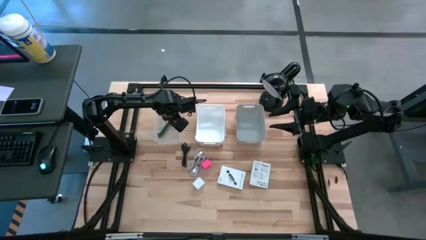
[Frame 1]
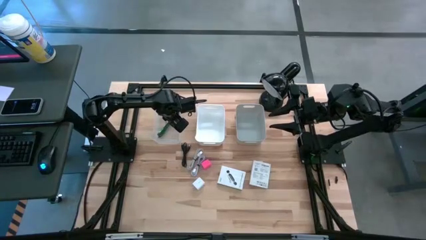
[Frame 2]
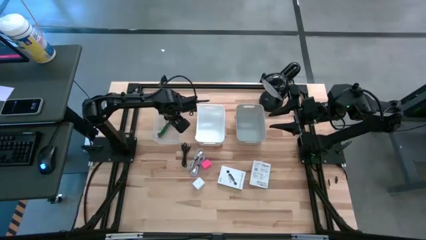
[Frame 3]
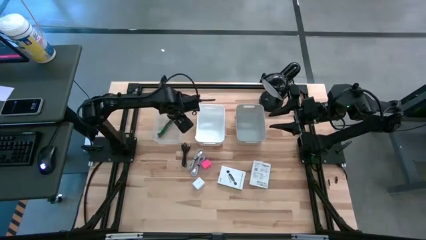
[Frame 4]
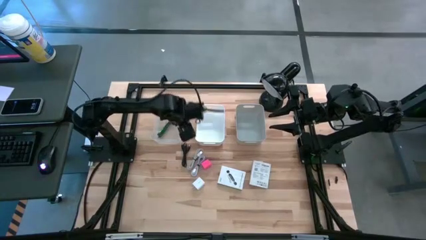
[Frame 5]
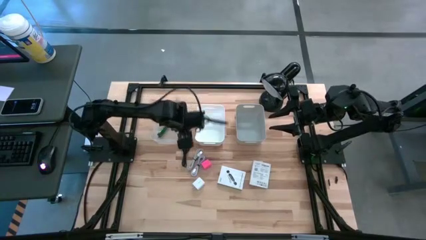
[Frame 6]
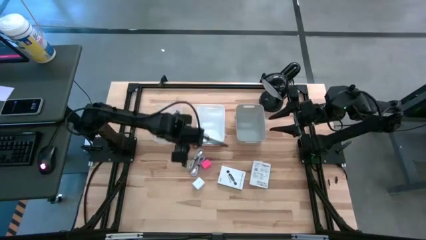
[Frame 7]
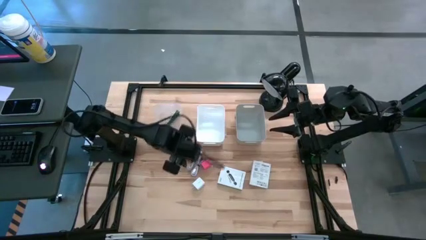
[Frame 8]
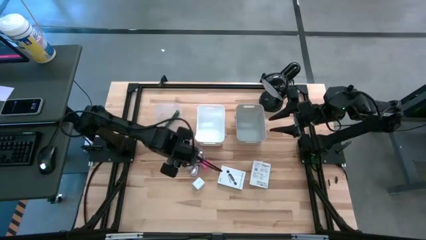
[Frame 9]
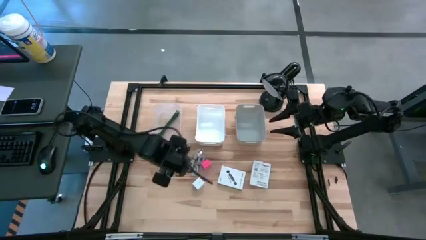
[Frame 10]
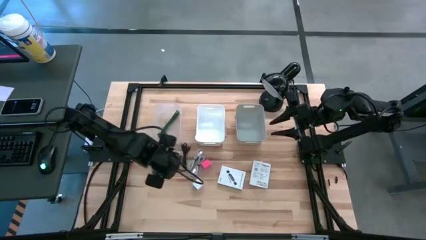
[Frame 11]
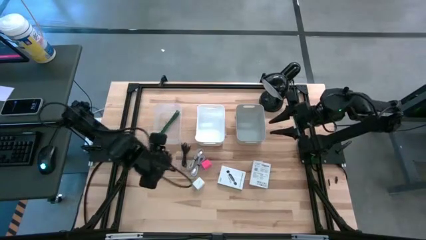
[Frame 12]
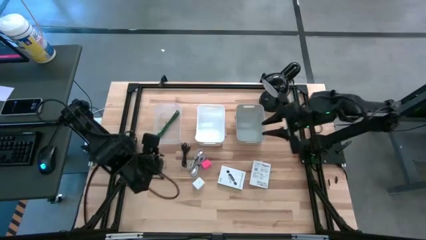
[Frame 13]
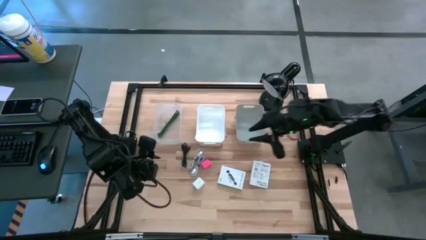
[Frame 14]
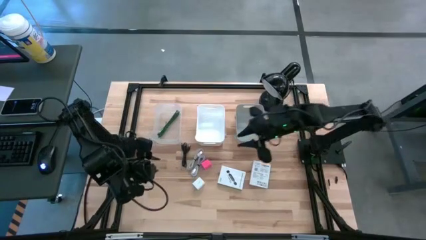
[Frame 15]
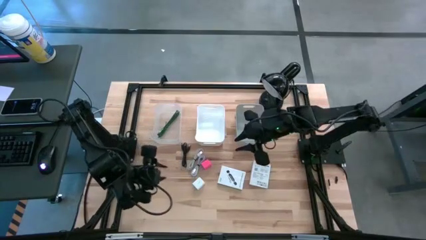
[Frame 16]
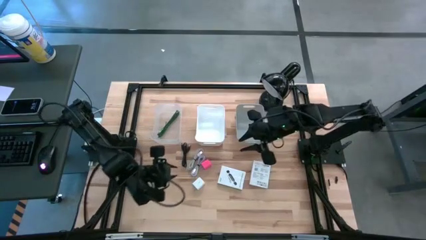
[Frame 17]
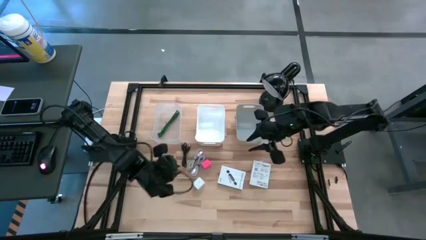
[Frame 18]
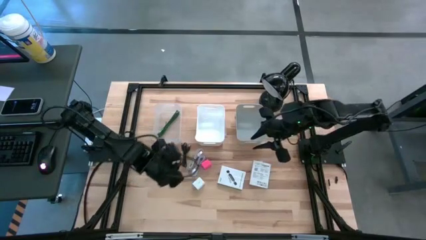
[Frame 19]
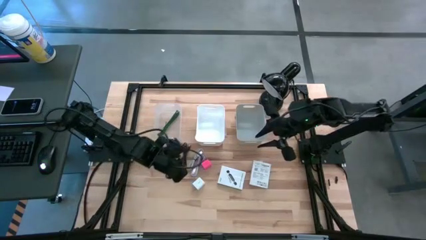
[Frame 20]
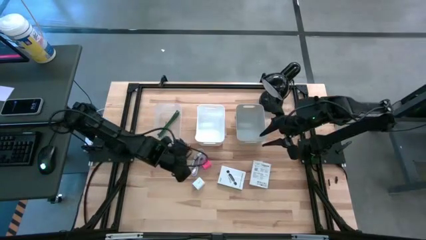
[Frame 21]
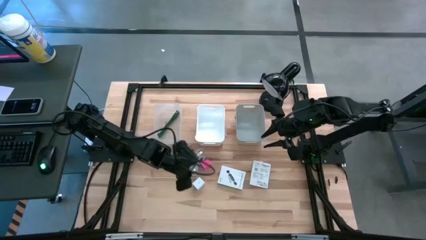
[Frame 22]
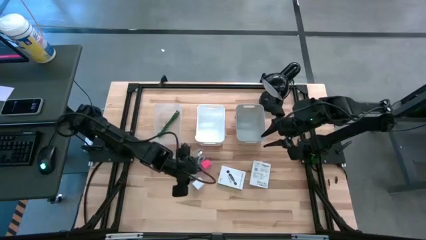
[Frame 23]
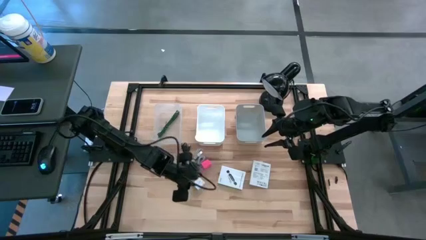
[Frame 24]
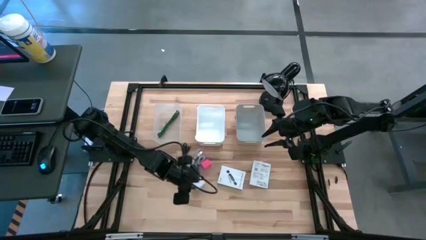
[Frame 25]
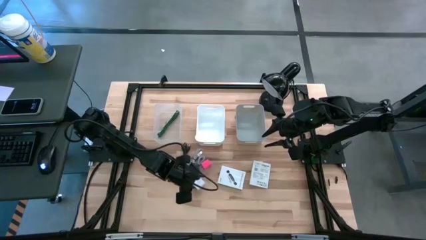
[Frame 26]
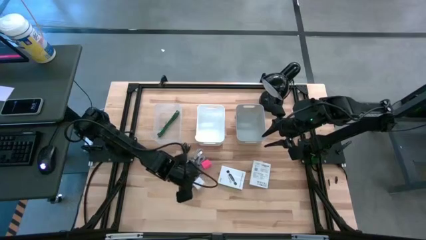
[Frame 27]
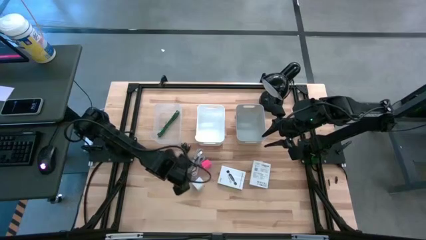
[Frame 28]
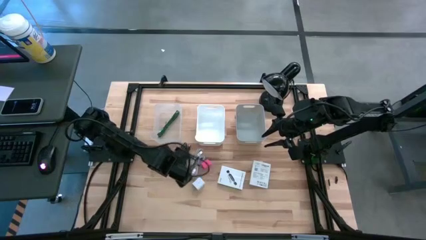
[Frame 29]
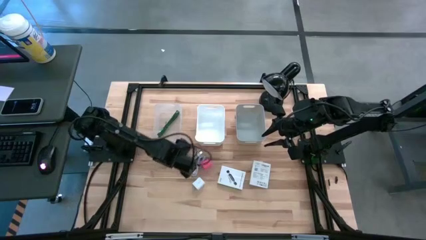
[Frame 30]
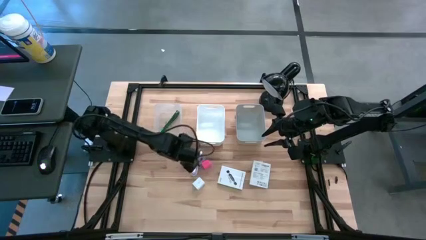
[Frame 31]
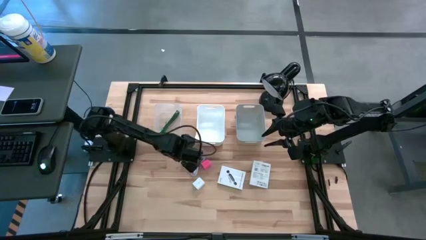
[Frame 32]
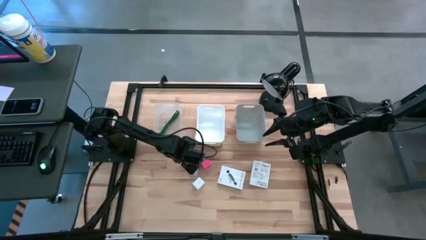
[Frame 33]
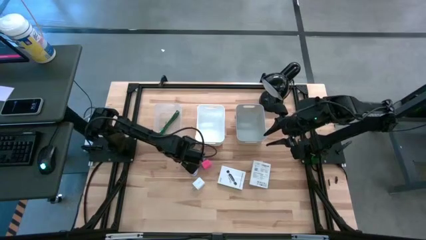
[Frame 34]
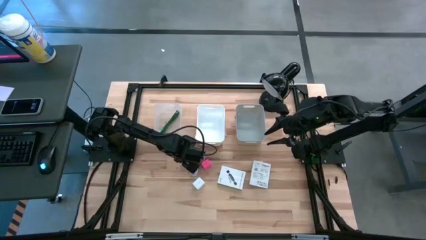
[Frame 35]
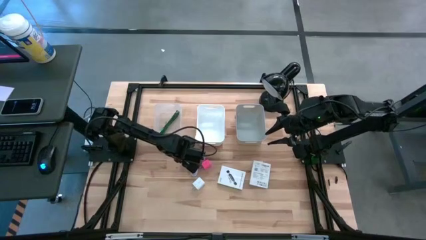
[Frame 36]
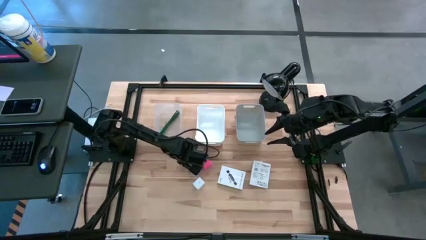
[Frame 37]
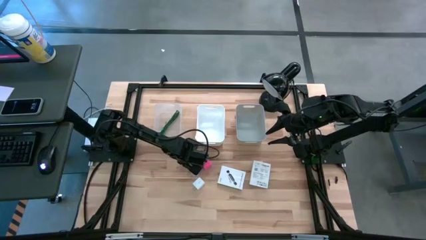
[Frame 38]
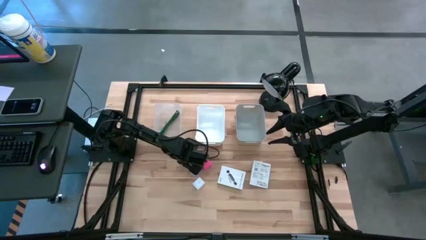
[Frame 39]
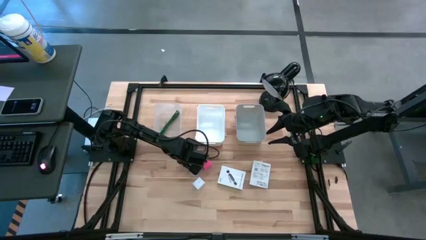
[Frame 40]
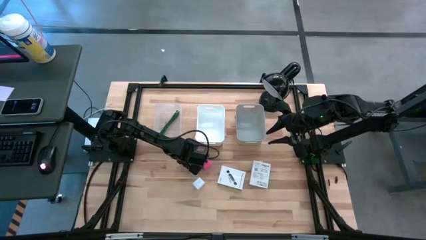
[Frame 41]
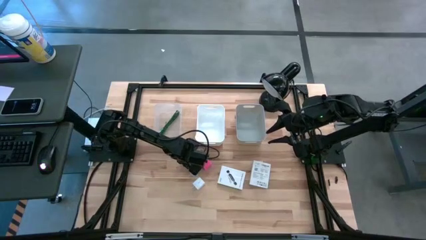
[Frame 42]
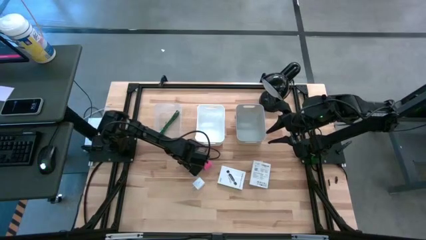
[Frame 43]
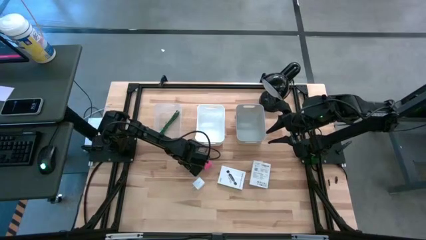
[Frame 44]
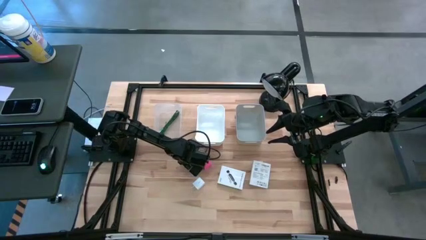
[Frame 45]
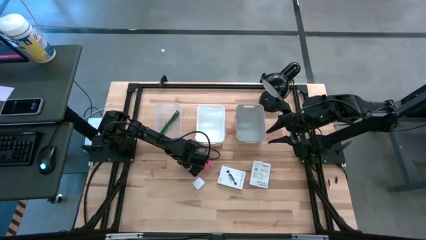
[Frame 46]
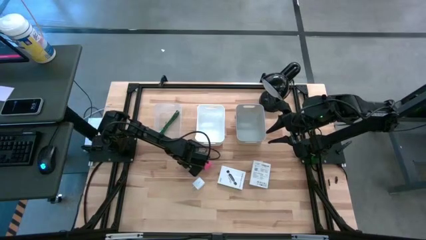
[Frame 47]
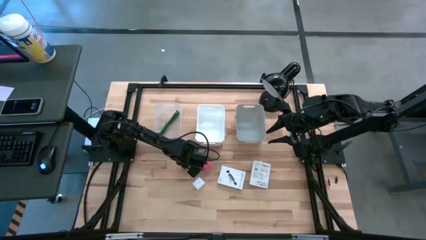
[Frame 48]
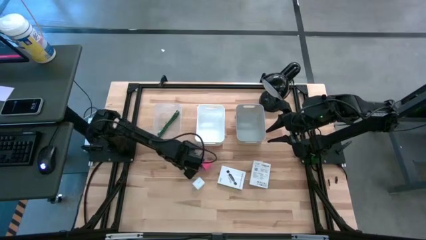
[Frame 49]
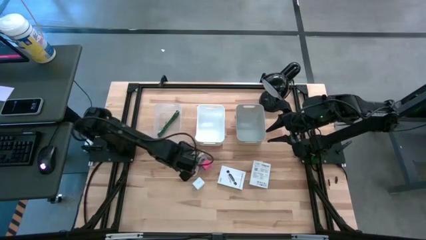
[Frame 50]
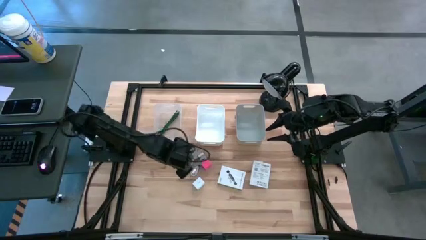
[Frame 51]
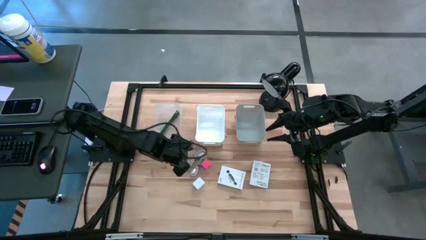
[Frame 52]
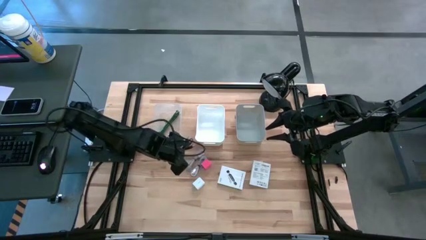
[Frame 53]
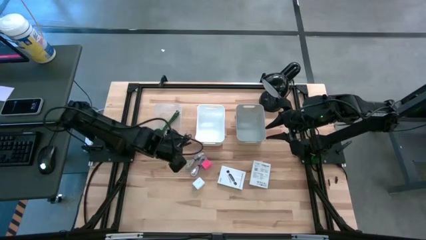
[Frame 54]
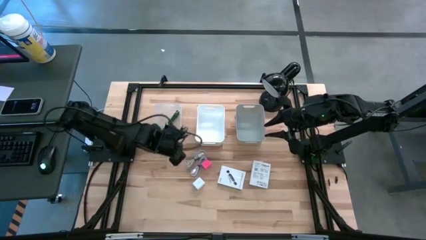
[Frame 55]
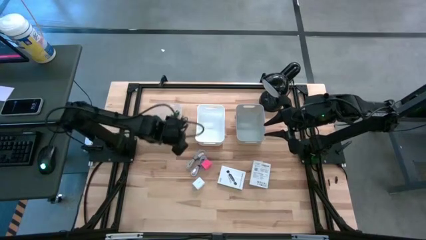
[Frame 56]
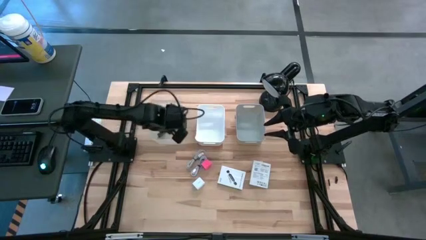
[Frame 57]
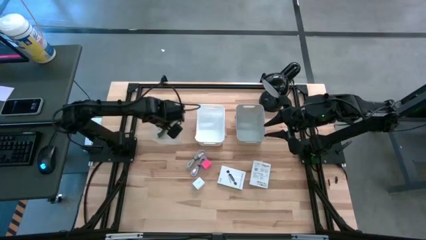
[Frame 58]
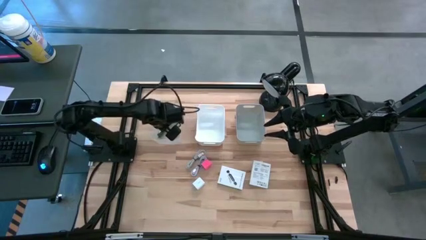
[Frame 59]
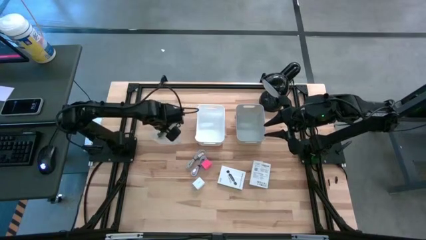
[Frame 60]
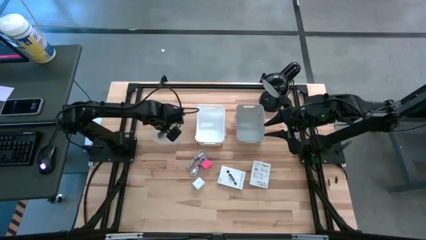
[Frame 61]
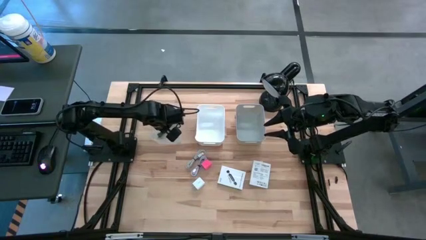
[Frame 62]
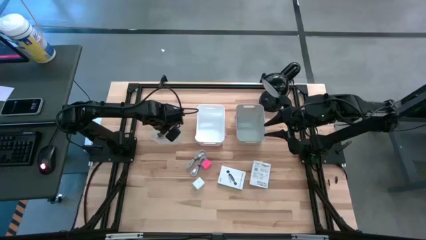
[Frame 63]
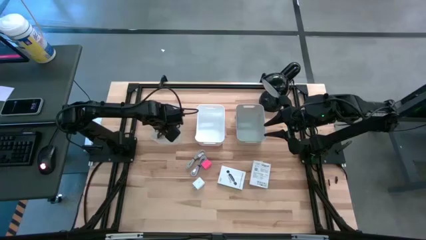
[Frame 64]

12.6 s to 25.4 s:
Task: Pick and place items into bin
Put the black USB cord into the transparent bin
